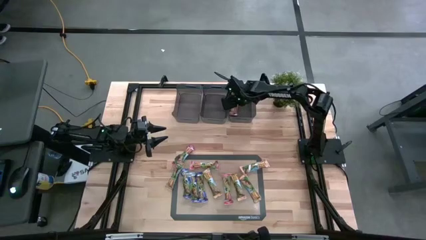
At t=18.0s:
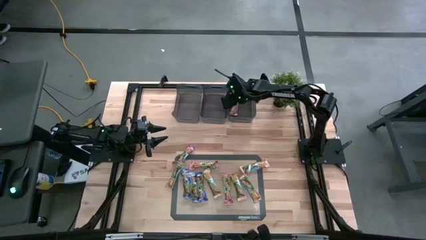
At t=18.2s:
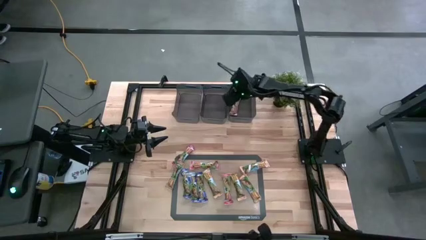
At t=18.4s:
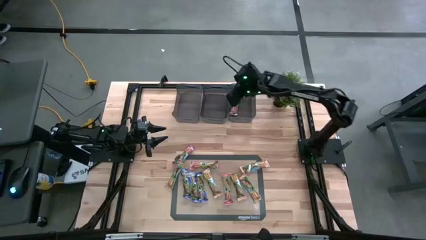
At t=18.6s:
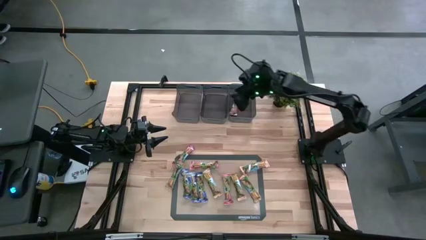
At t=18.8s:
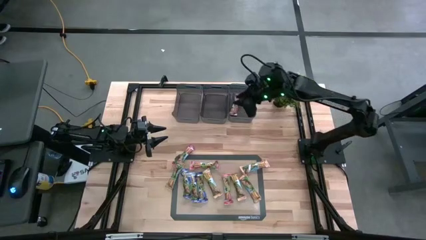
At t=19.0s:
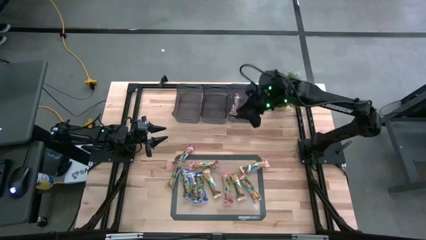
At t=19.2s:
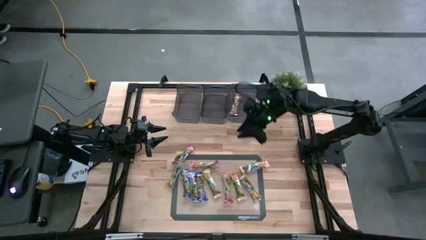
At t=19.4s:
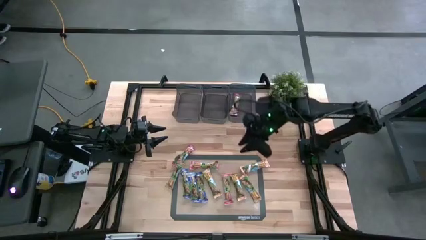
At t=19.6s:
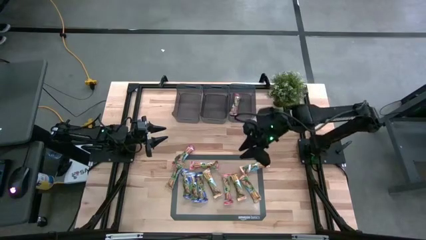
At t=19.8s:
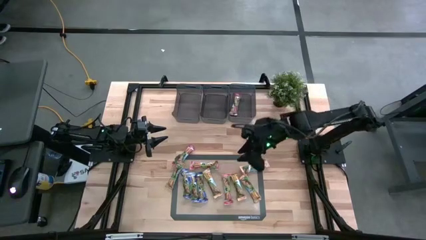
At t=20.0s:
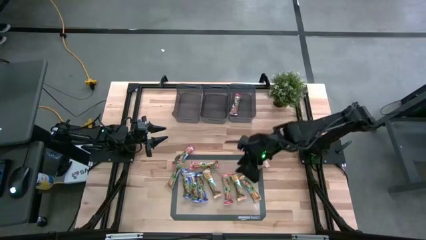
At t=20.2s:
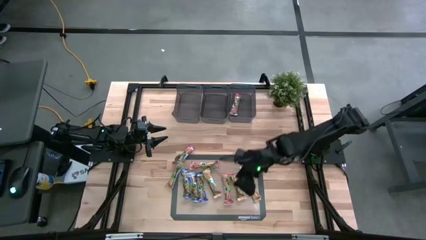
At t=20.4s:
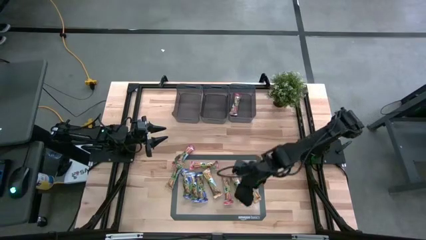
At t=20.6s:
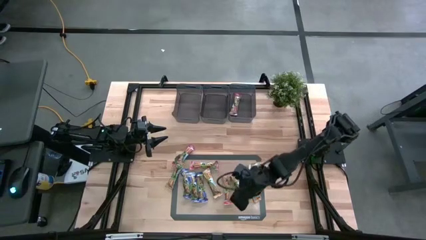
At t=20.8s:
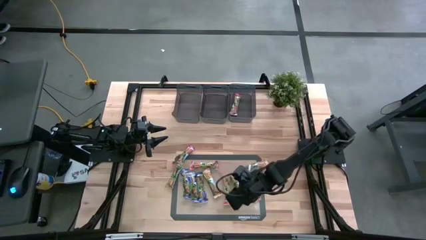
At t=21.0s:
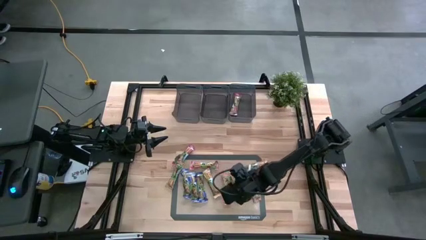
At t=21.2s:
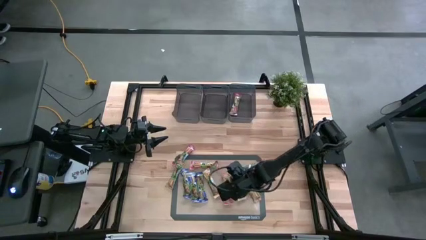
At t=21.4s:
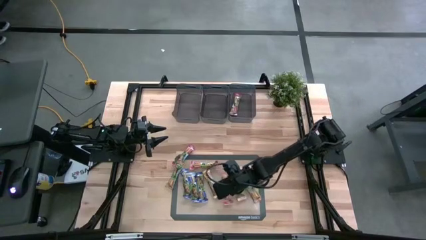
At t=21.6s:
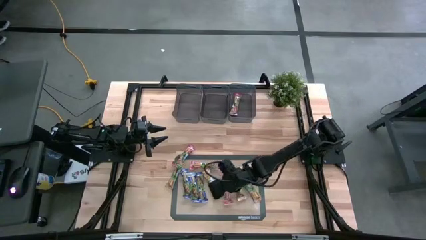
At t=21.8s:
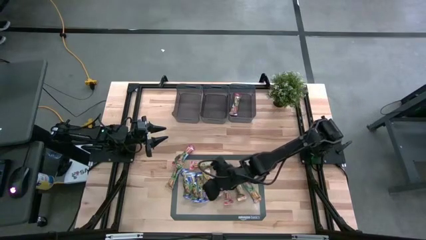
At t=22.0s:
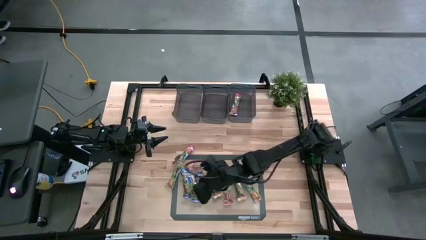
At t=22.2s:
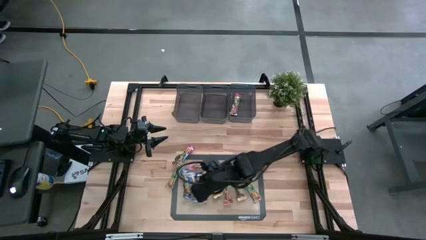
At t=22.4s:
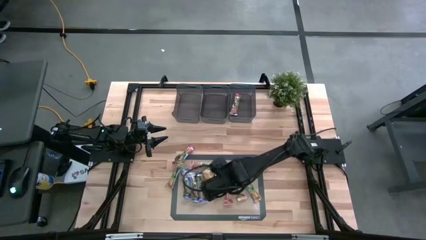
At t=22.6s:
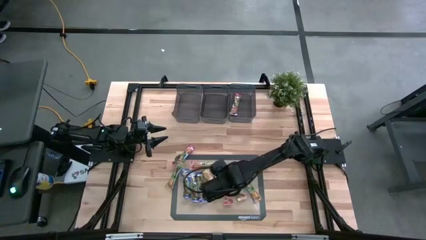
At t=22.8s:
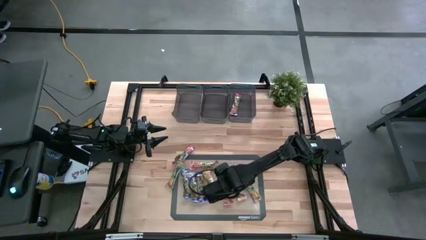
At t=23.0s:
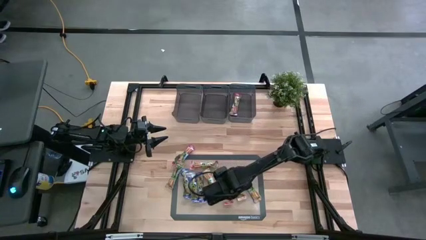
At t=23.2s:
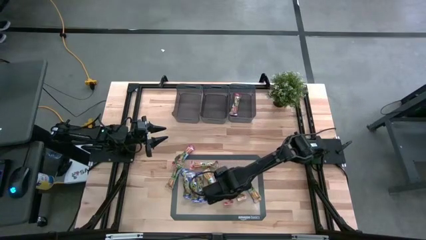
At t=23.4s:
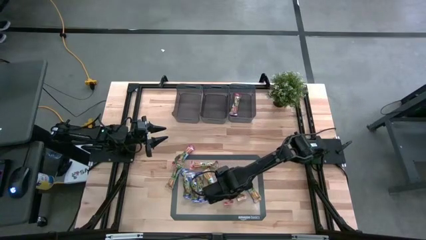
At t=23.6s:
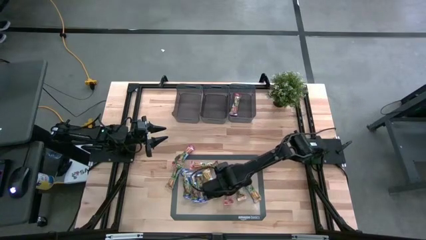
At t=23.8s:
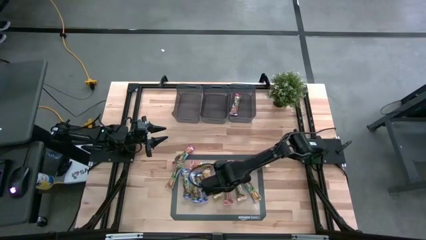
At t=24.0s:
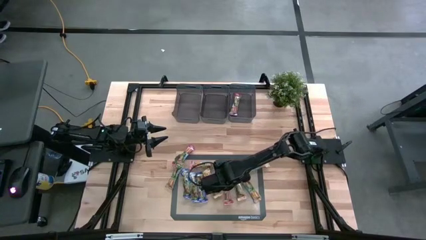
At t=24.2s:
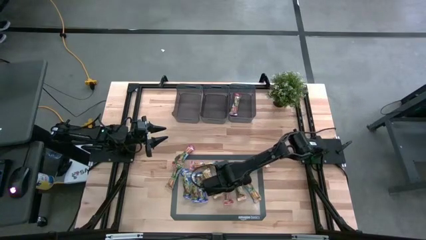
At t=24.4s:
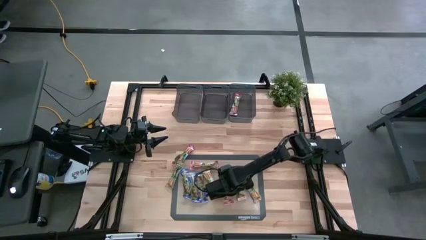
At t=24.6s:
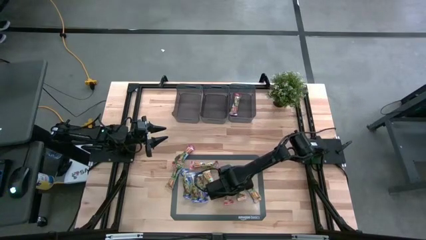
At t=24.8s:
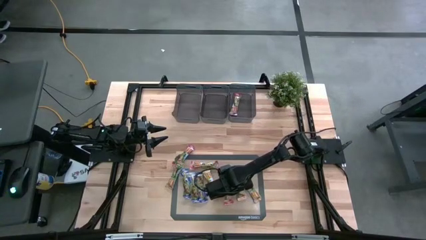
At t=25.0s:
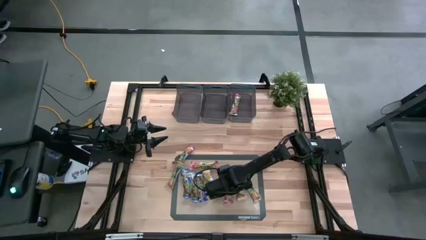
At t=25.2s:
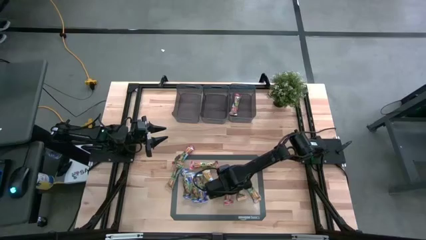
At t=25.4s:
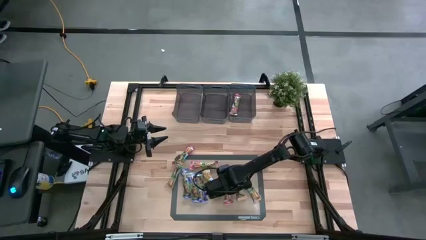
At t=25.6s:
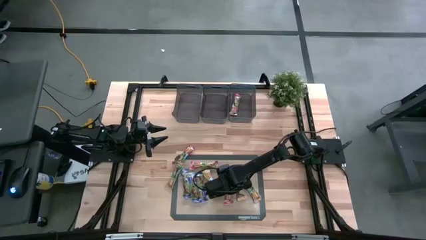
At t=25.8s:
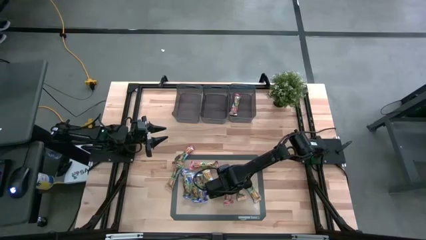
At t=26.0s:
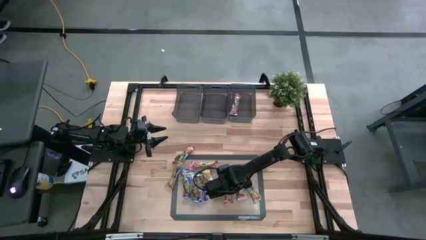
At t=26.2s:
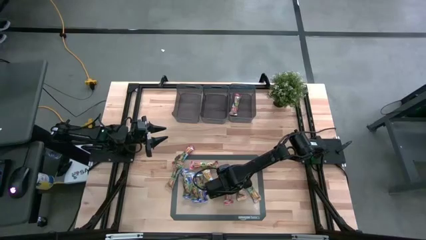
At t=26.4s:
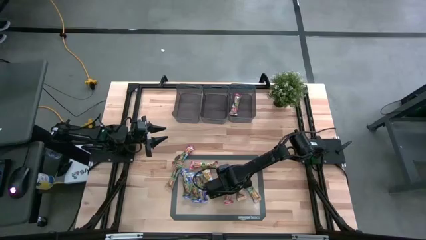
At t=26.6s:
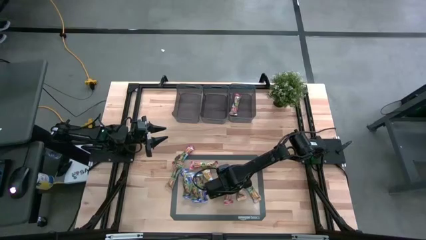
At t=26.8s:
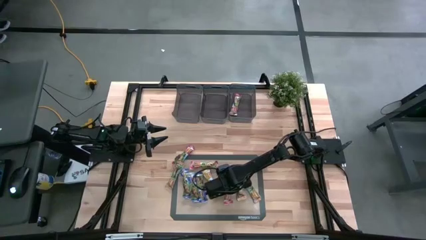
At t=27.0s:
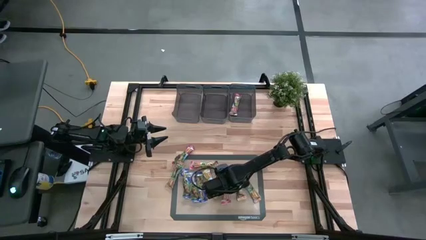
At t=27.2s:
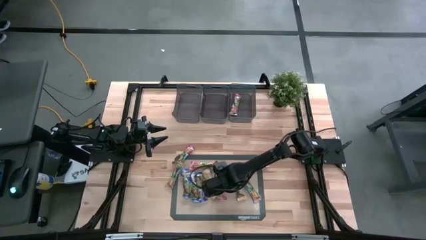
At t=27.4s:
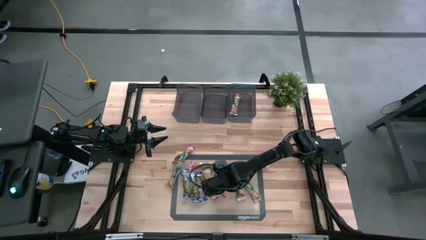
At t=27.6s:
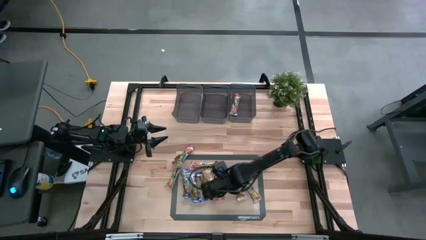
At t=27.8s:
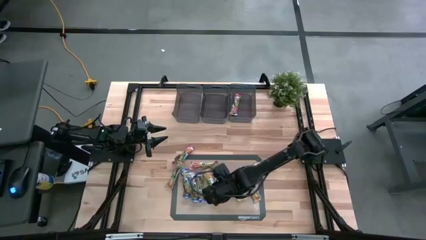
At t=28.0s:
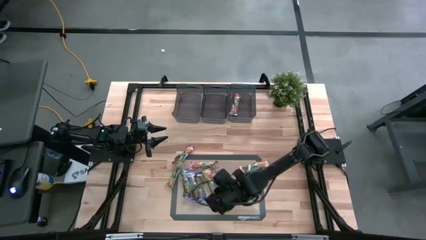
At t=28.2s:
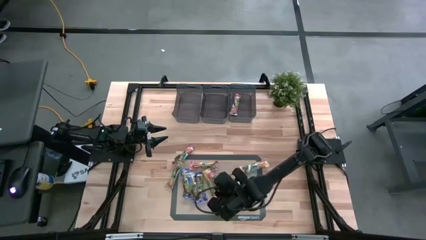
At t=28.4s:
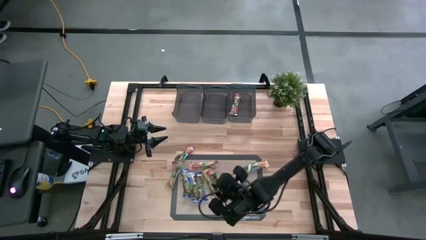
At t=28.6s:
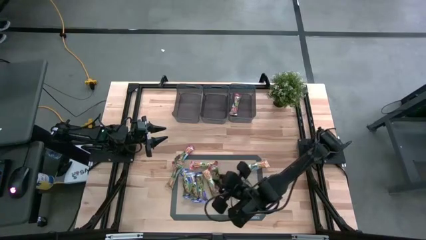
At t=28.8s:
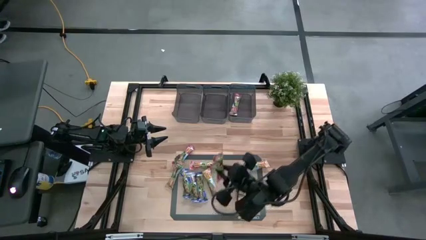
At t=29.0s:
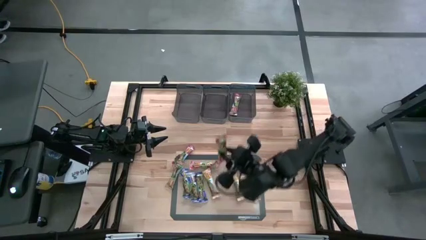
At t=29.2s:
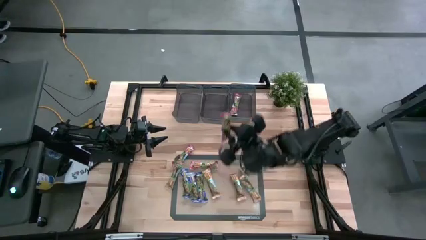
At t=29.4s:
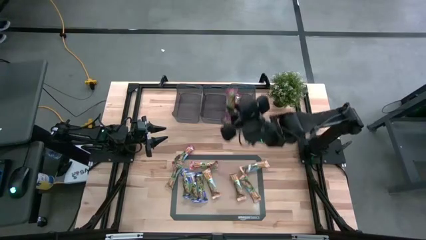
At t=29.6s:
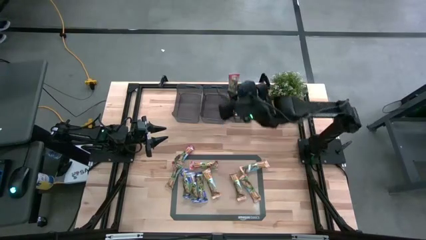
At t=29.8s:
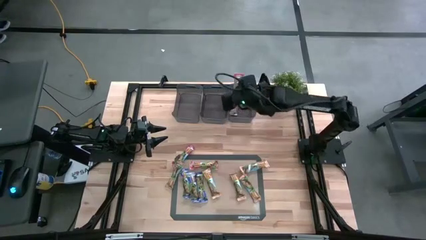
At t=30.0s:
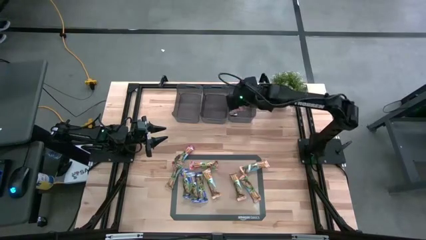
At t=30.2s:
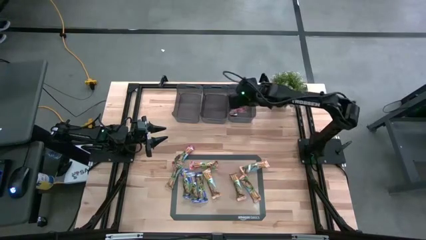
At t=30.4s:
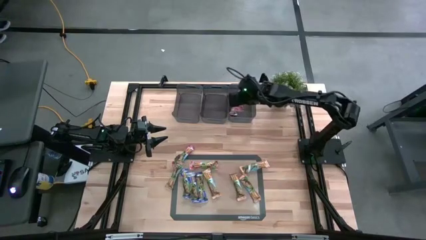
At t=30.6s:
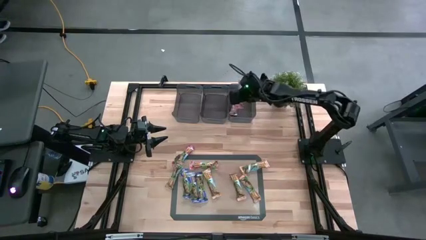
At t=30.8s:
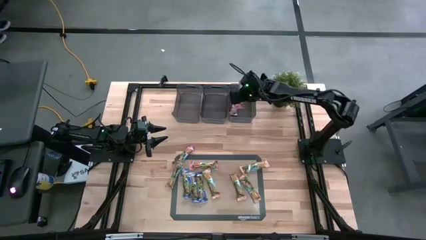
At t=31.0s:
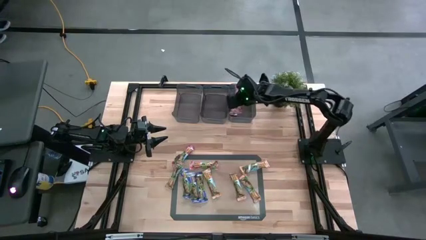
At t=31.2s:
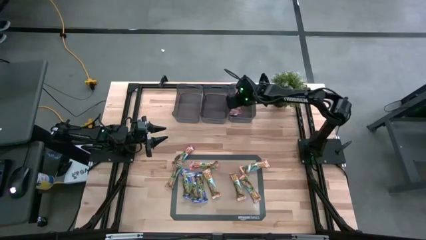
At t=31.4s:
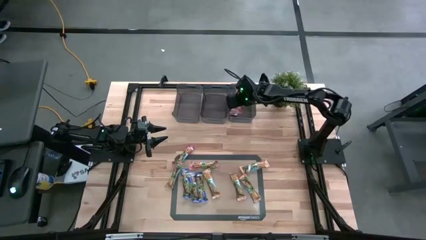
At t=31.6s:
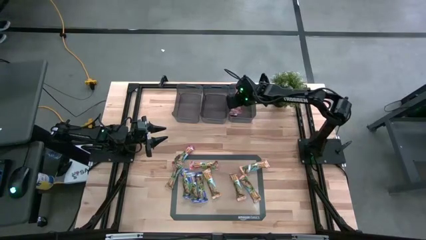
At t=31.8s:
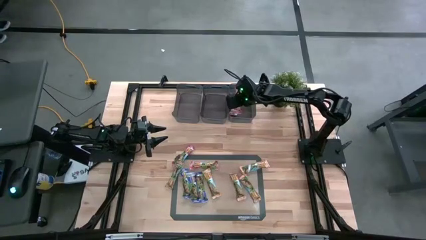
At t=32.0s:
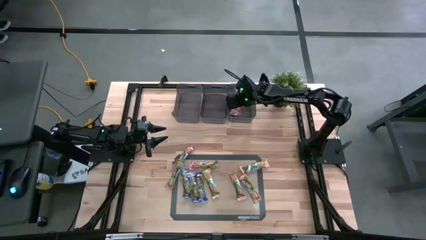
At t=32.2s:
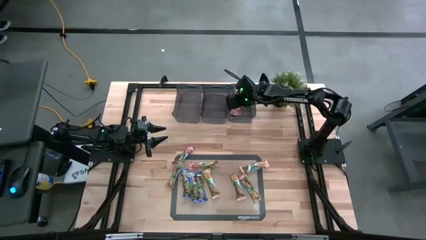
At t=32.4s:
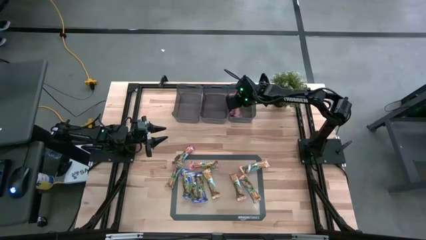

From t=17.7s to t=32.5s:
Task: Pick and place Granola Bars by type
Put the red granola bar into the right black bin
